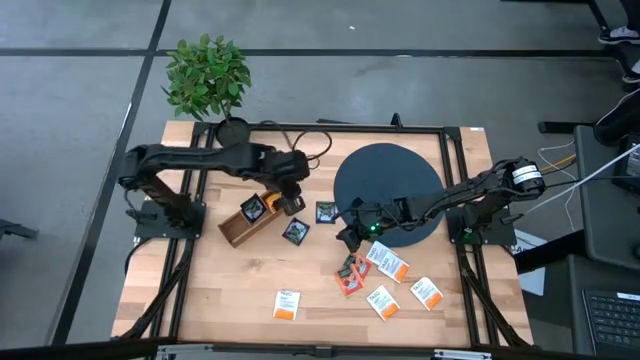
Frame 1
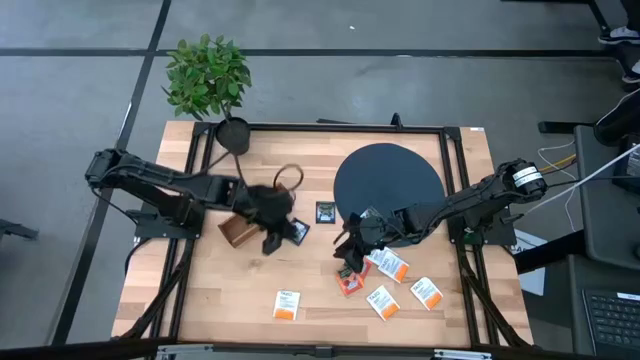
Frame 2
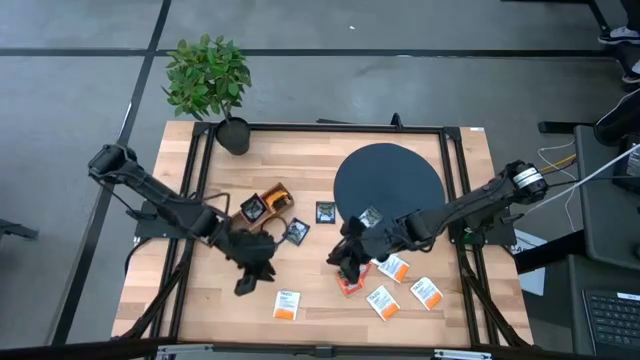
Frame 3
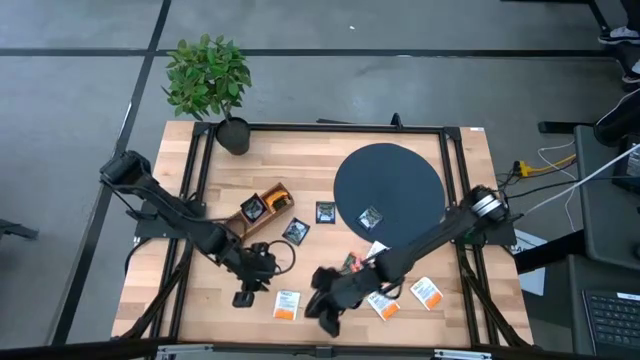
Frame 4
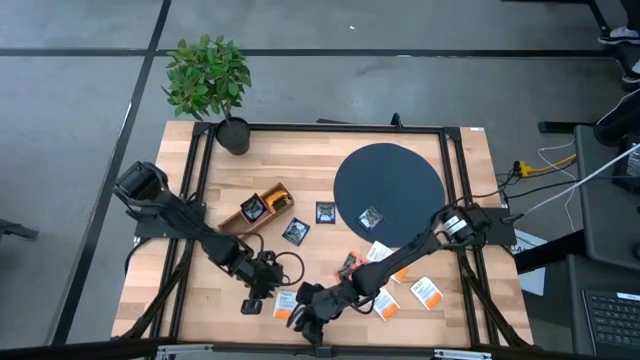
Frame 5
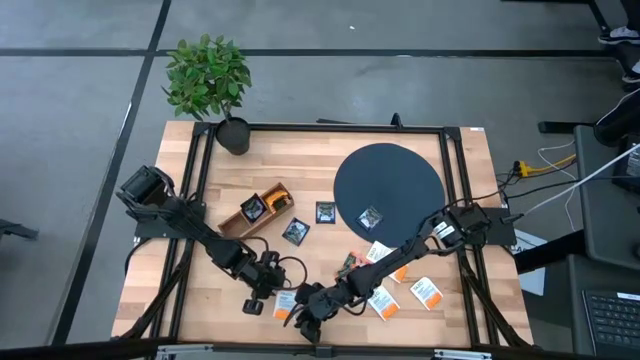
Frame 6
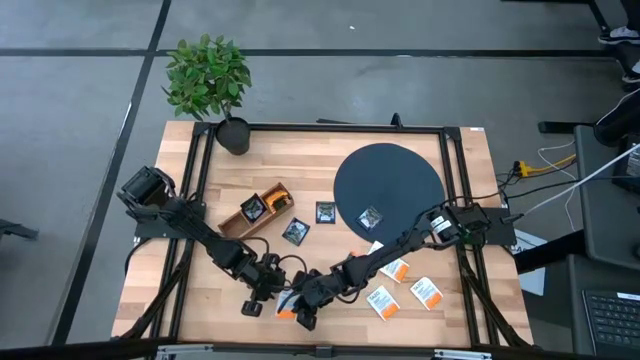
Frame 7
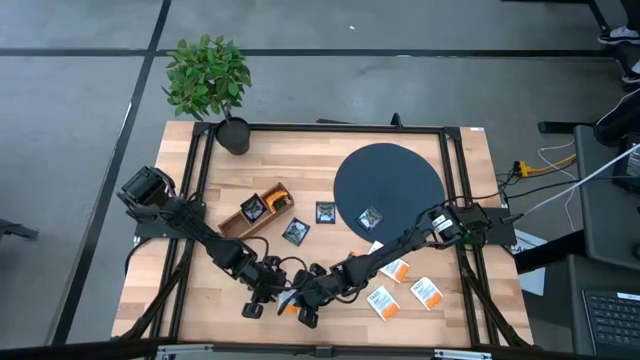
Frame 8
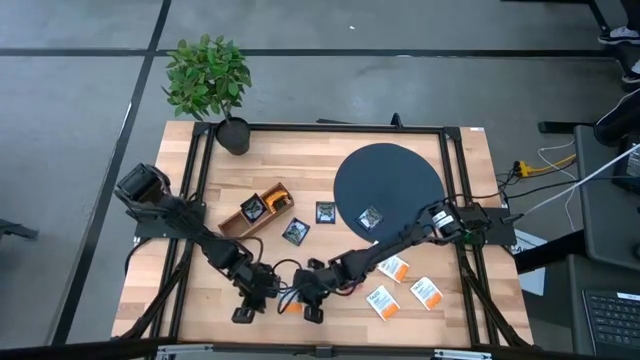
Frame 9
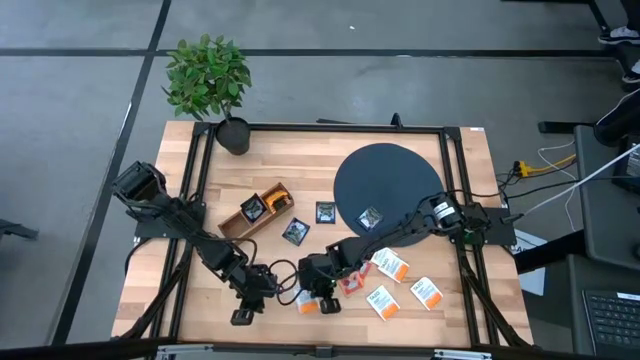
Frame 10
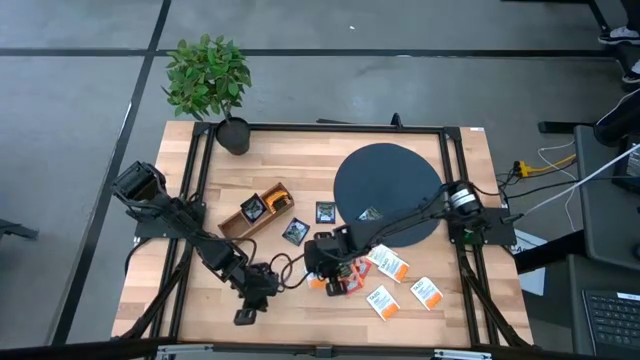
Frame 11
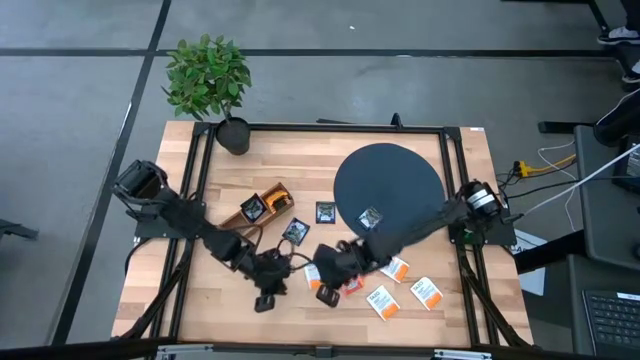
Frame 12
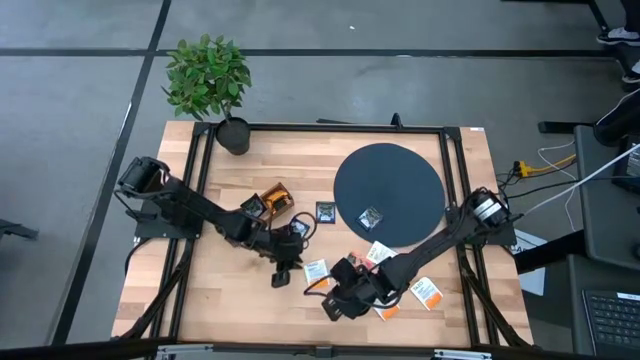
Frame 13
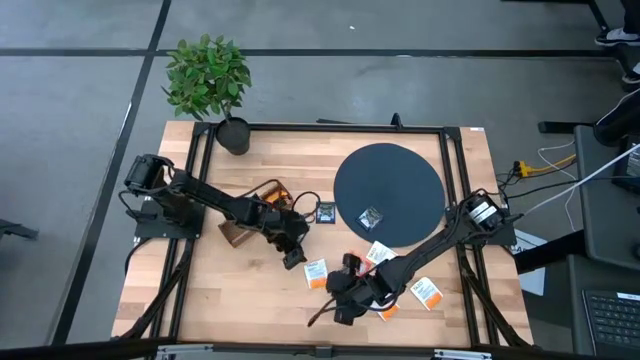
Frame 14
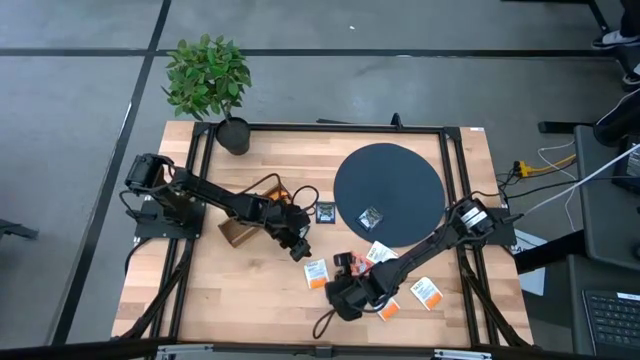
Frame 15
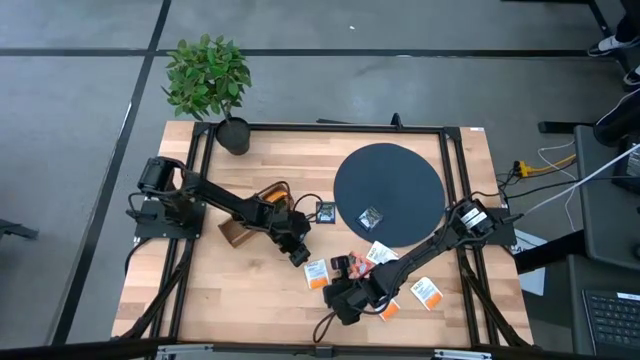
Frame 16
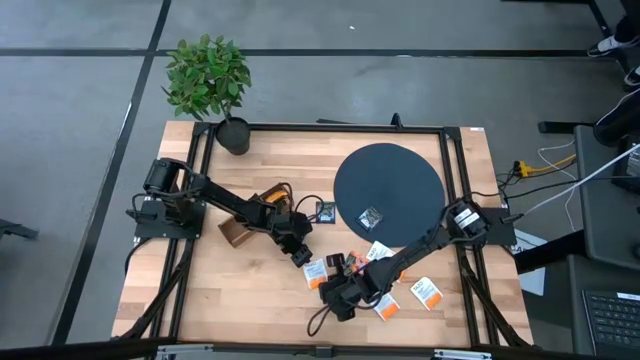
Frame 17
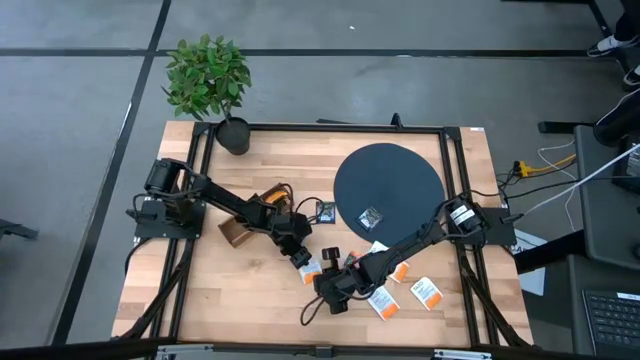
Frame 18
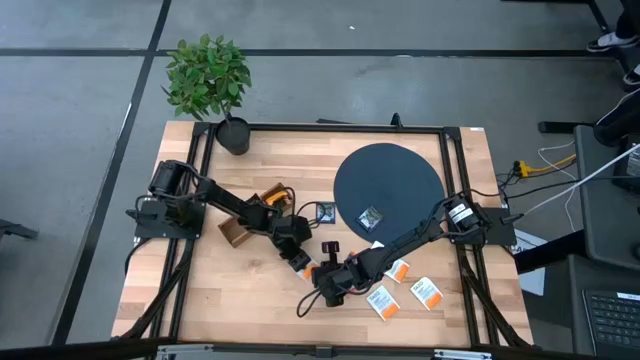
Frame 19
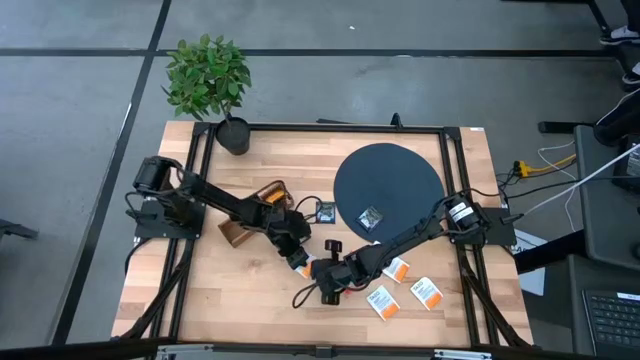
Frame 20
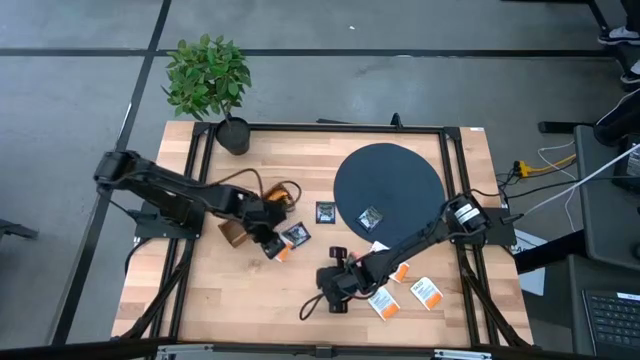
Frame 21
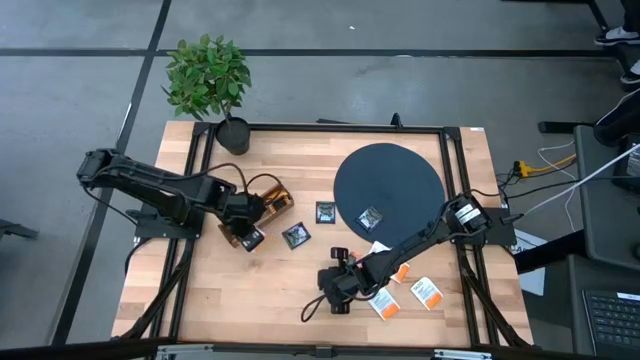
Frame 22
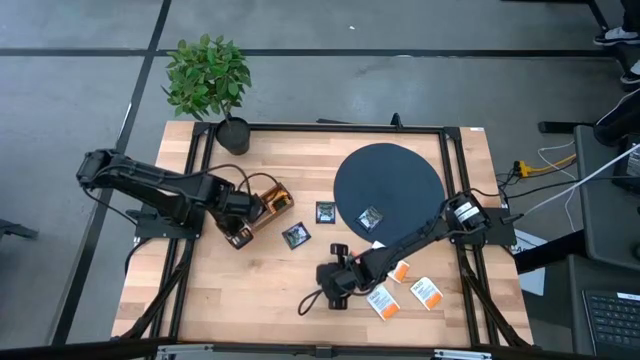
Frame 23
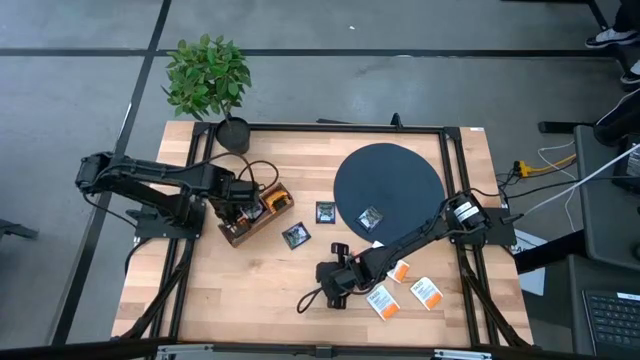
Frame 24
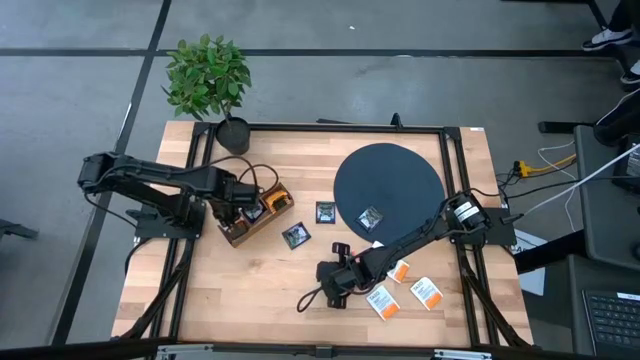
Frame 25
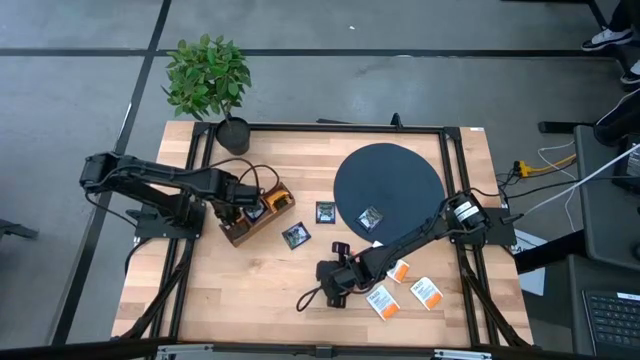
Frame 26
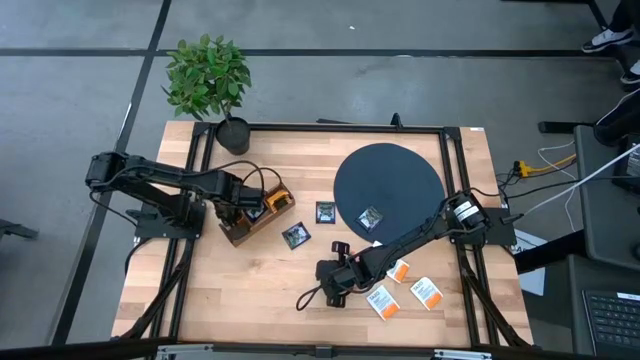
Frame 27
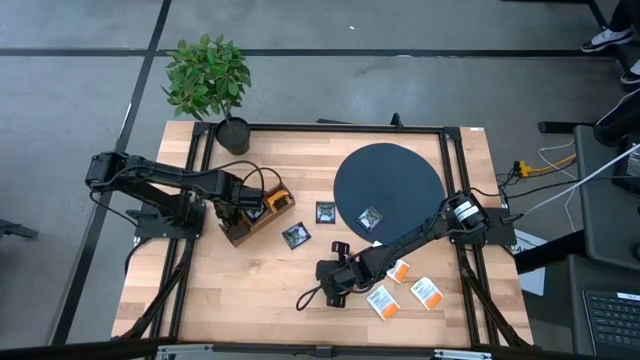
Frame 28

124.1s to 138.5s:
Task: Pick & Place Tea
Put the white tea bag into the left section of the wooden organizer

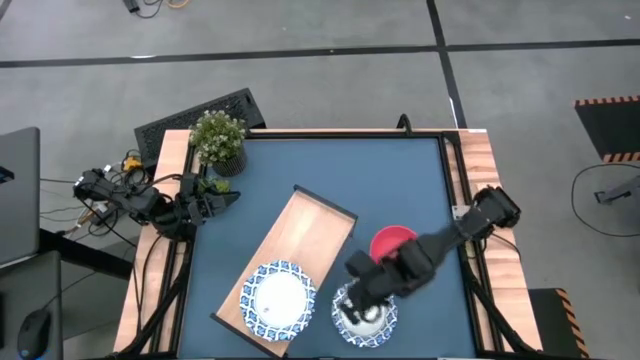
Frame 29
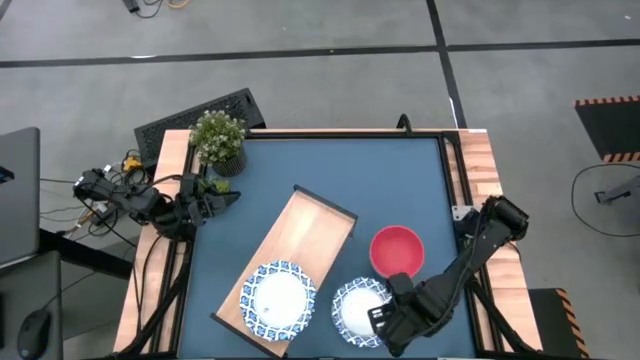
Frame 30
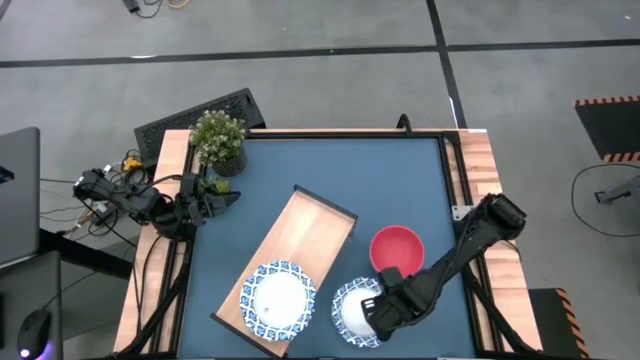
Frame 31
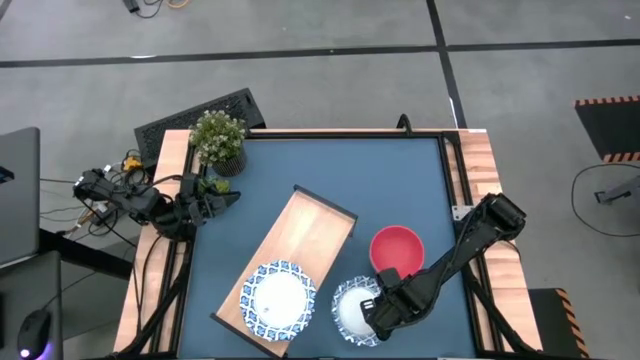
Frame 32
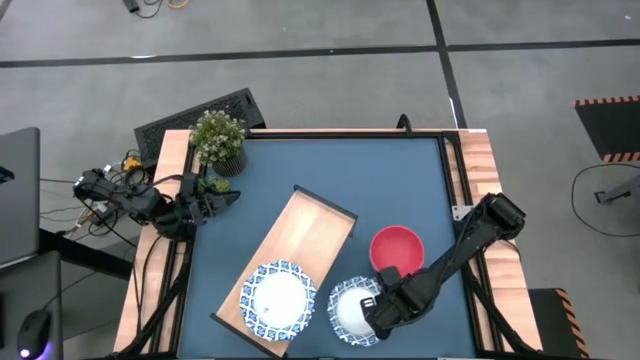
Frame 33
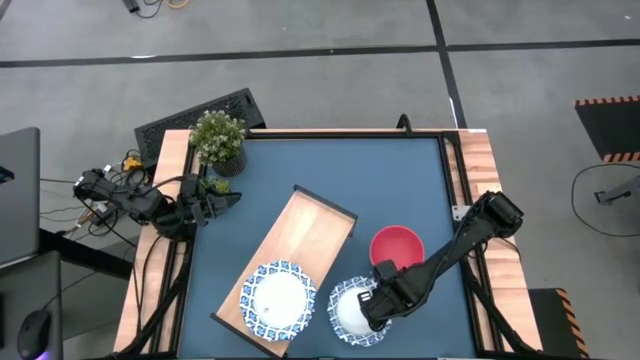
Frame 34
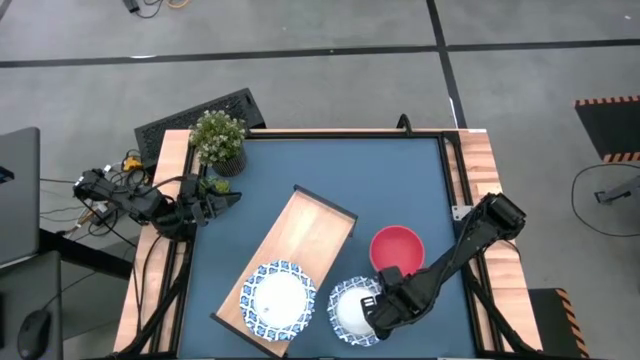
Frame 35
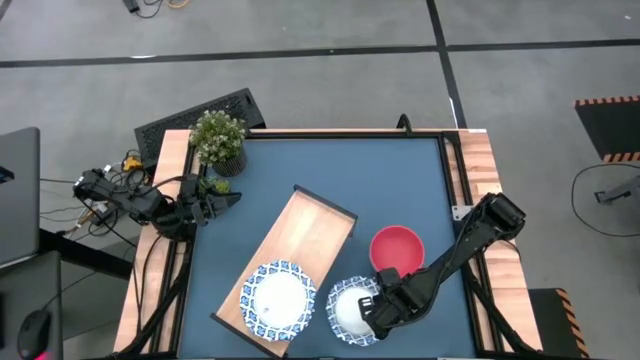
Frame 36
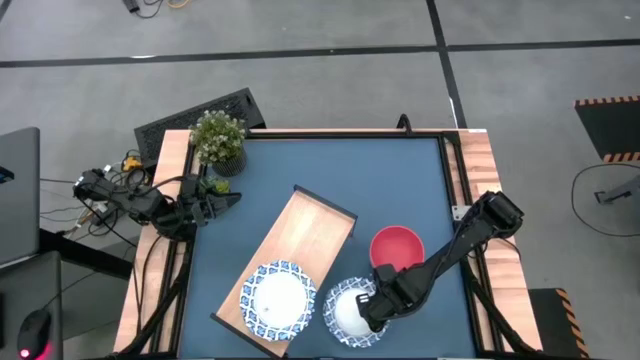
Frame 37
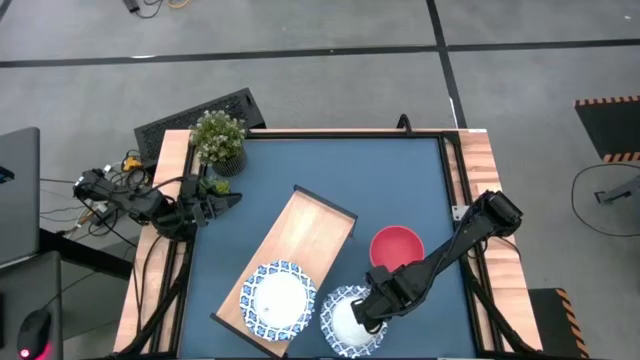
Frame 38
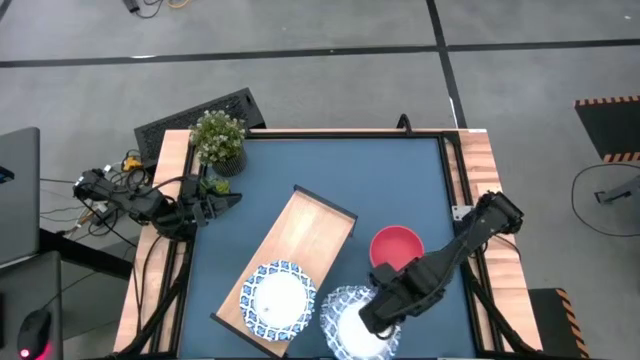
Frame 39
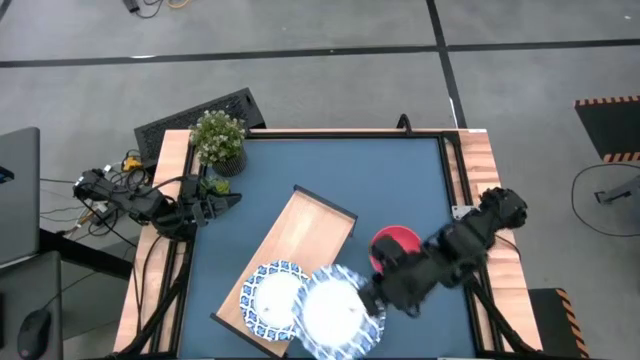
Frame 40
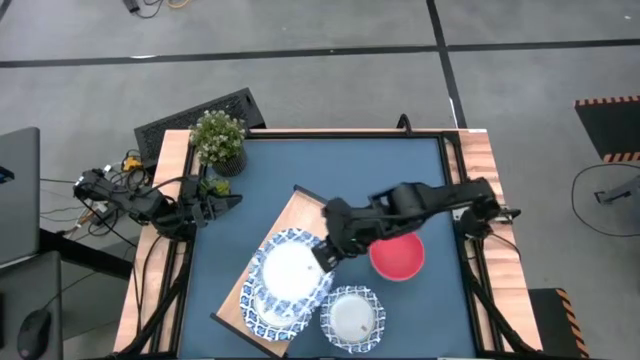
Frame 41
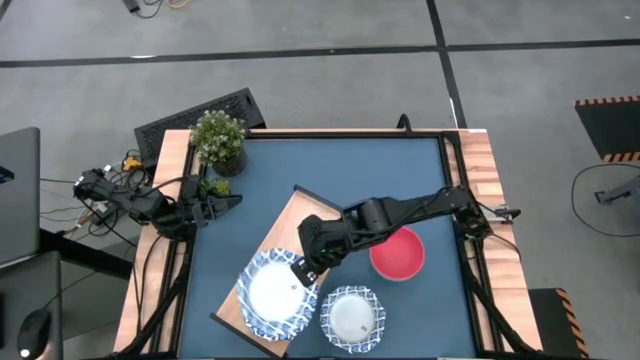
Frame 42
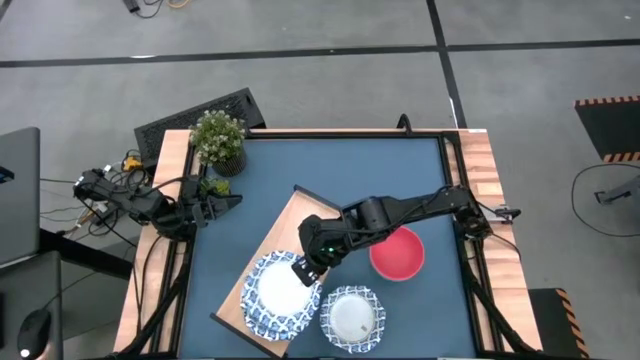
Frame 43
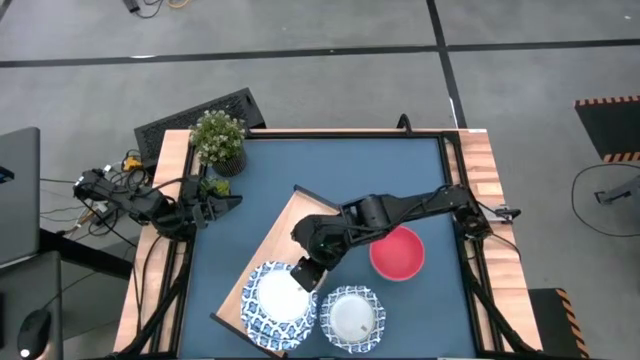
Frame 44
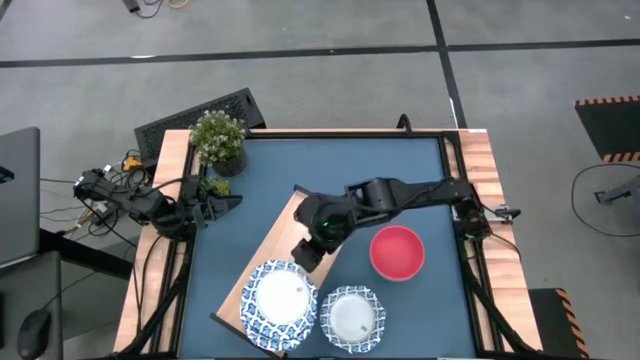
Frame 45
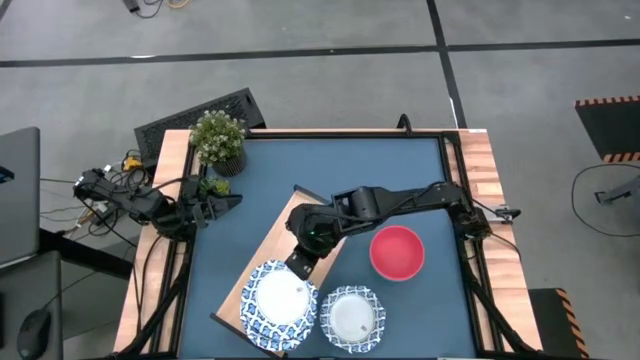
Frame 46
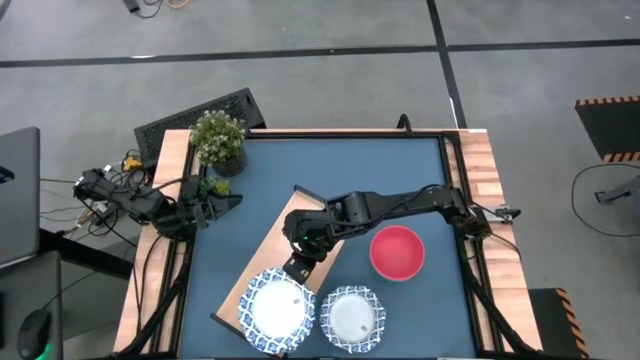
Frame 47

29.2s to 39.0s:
Task: Place and stack bowls onto a shelf
Stack the white bowl on top of the other white bowl on the shelf
